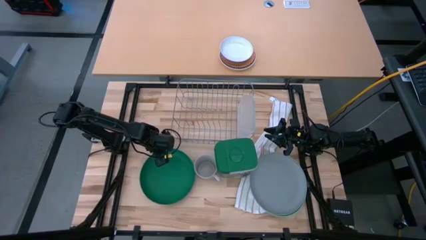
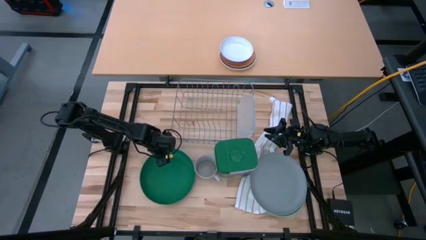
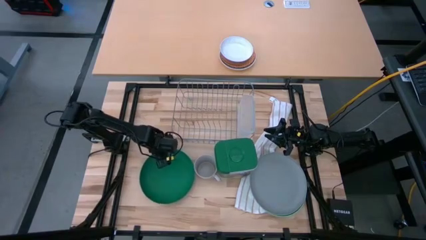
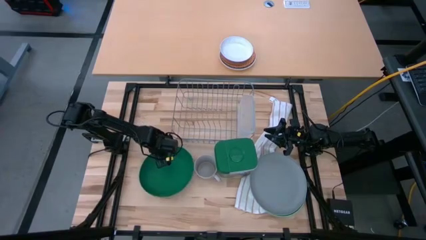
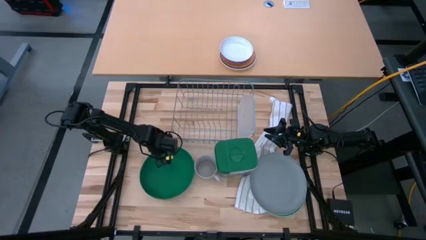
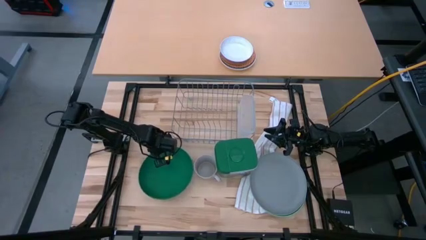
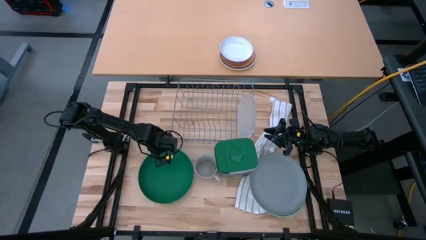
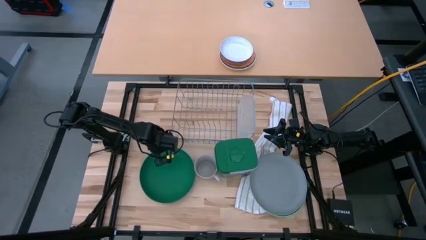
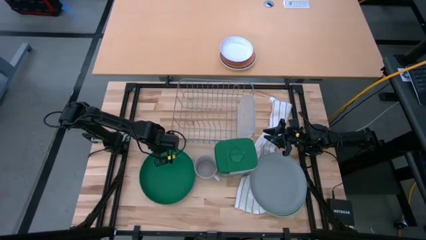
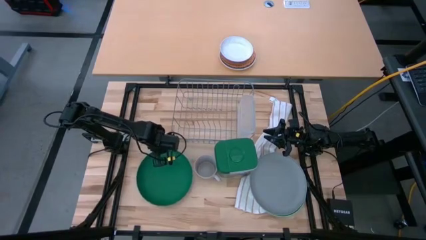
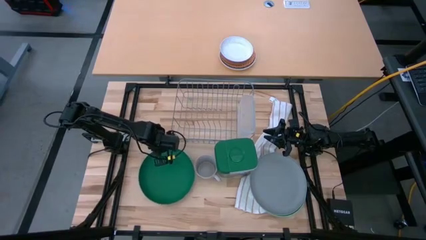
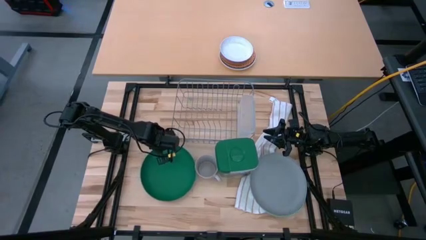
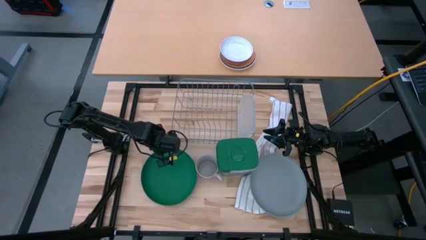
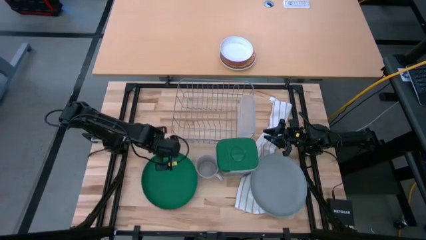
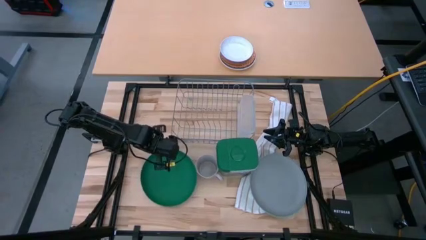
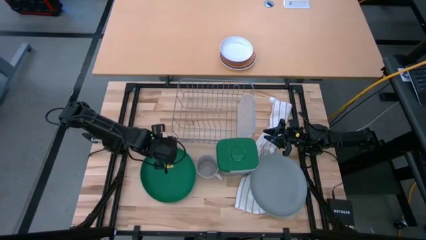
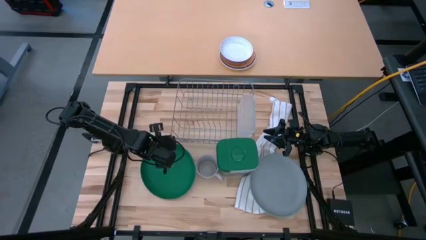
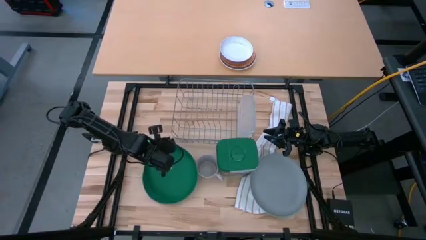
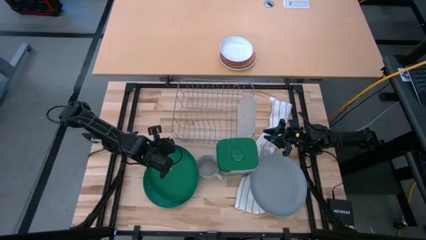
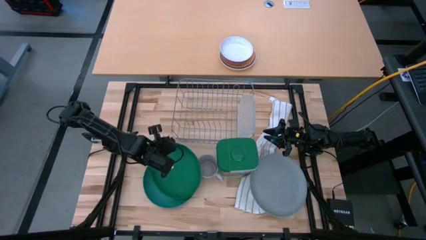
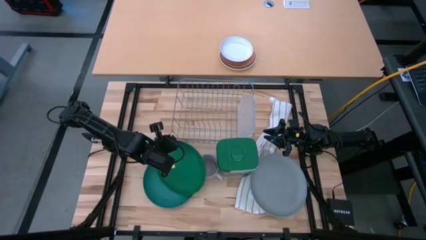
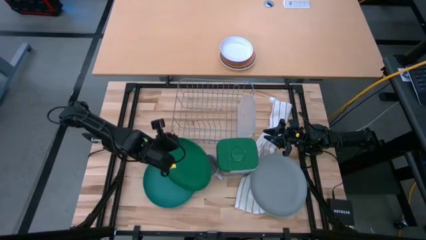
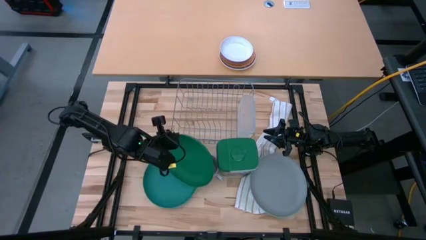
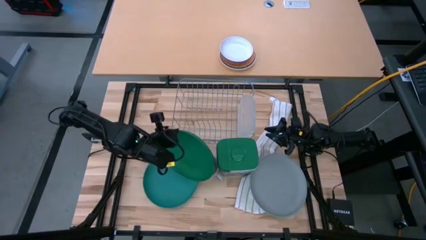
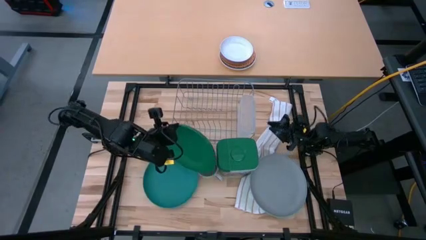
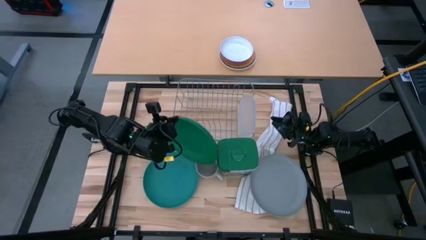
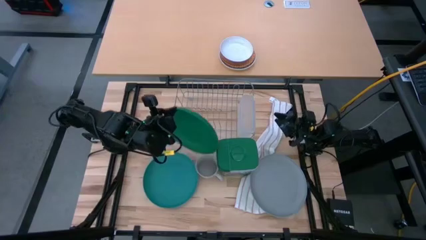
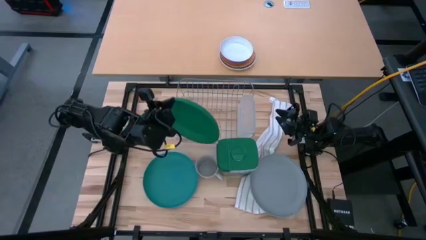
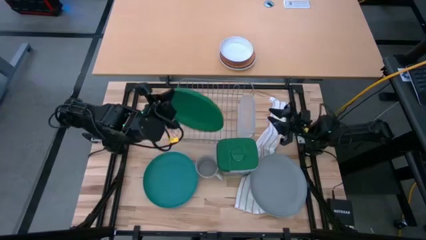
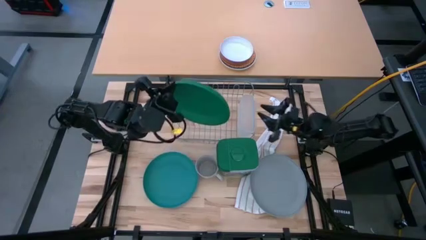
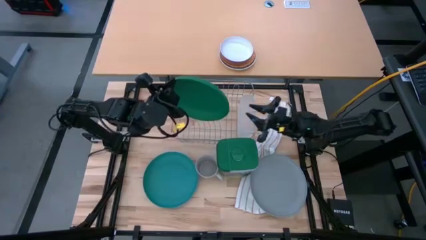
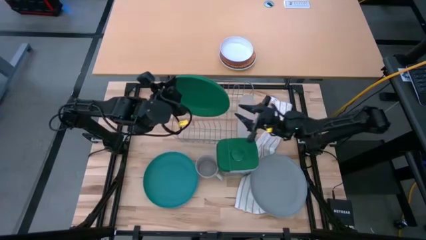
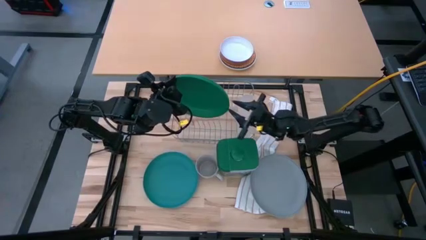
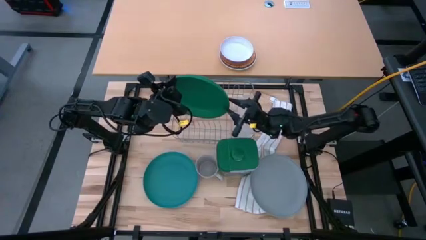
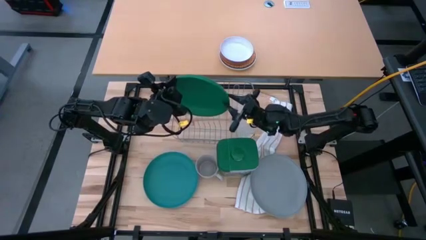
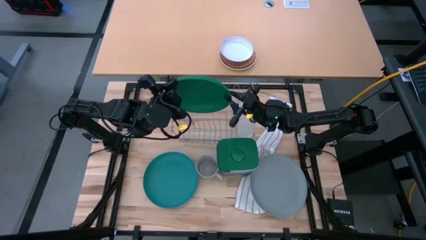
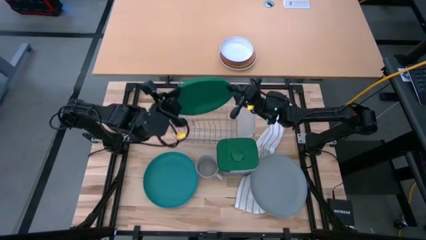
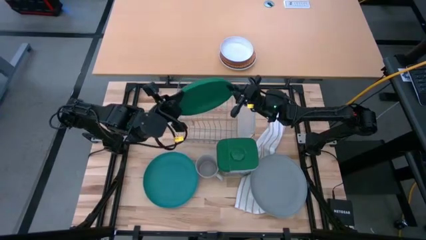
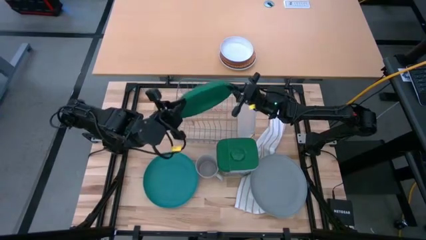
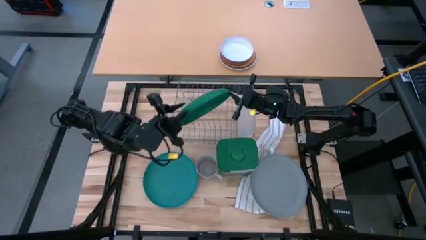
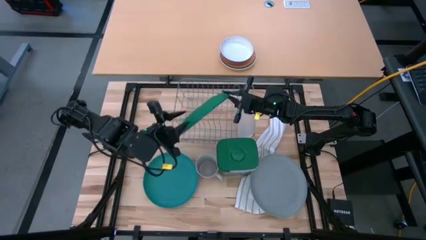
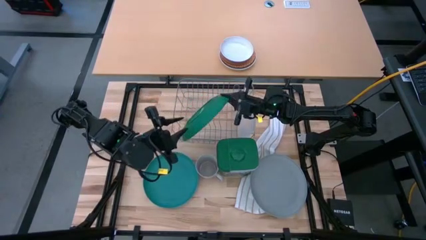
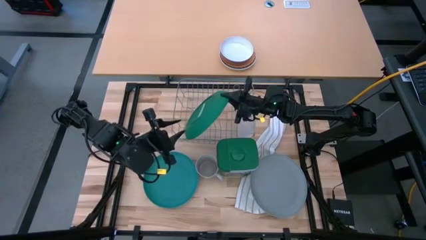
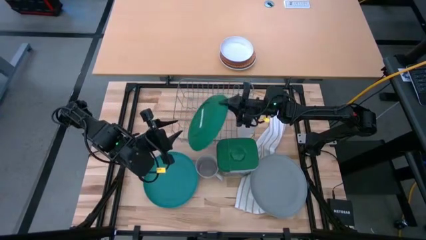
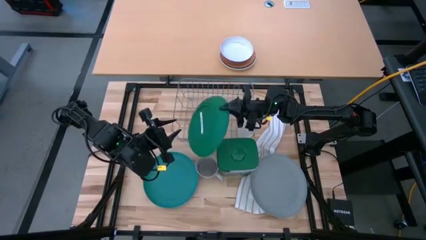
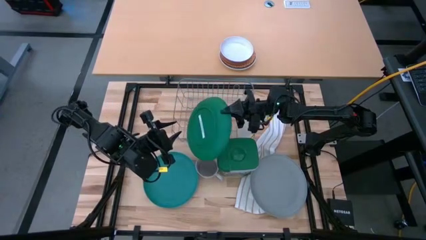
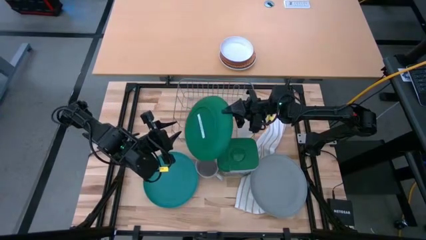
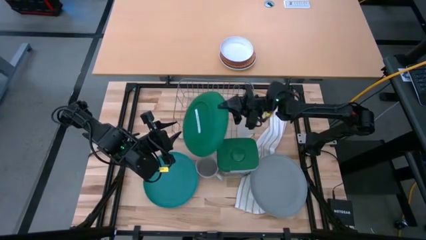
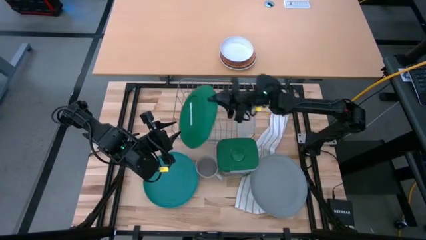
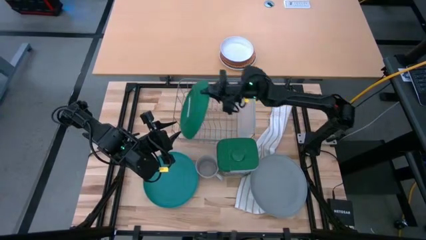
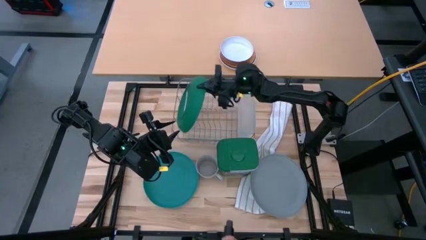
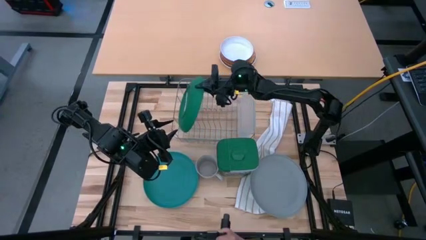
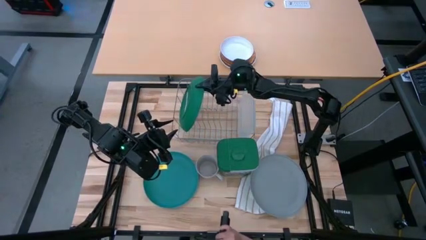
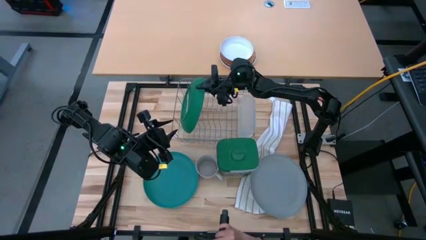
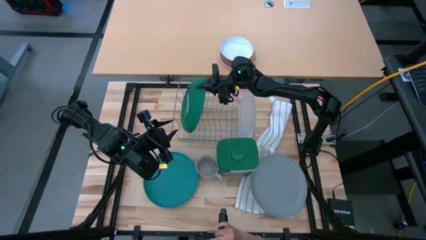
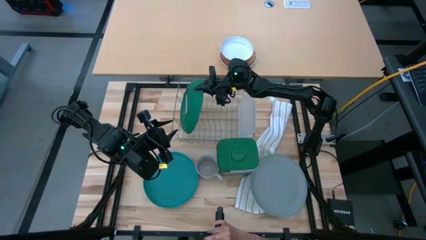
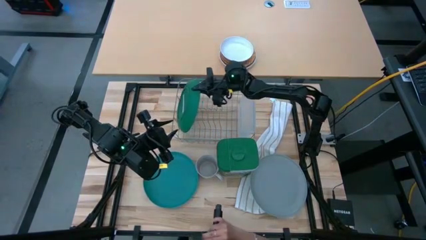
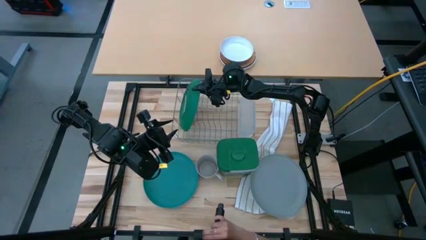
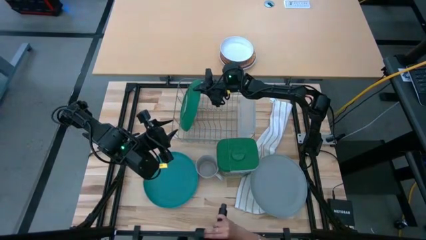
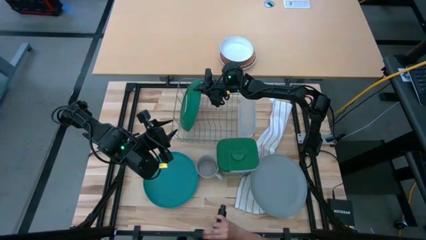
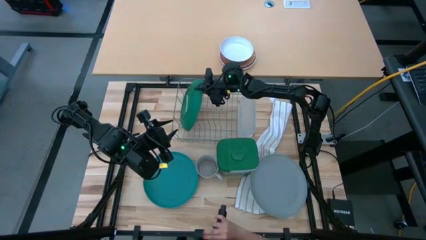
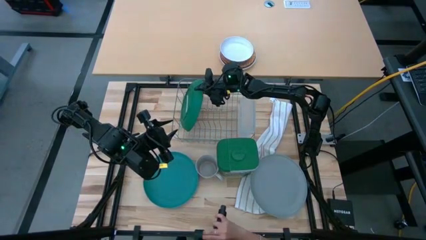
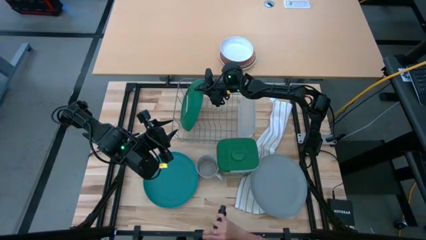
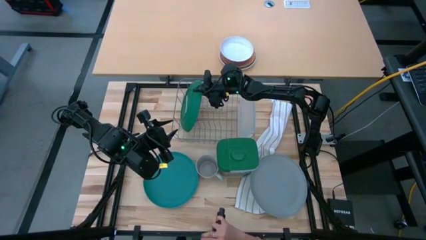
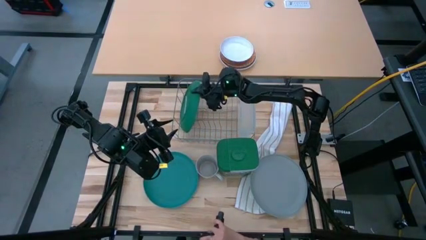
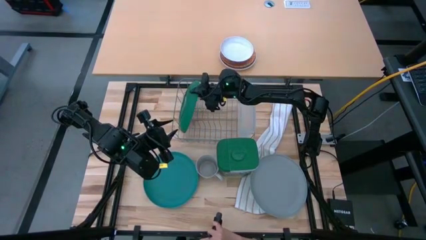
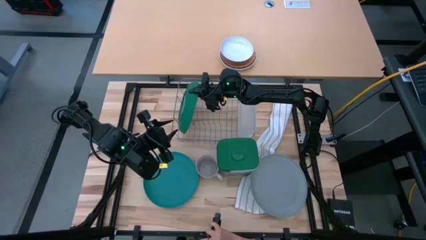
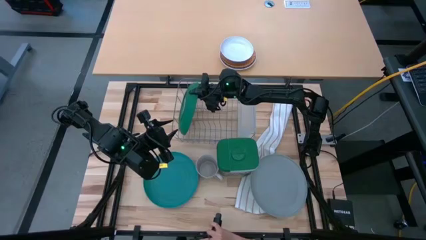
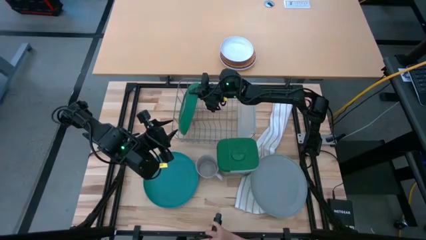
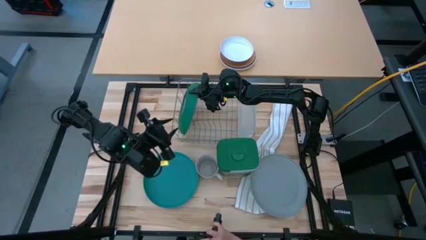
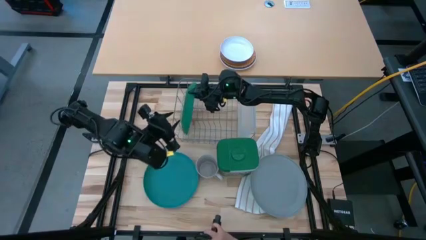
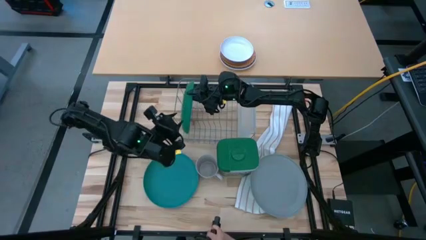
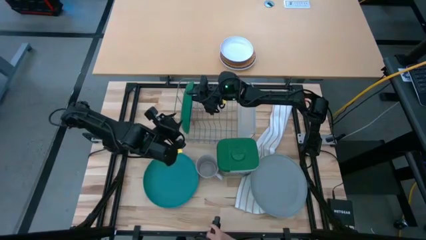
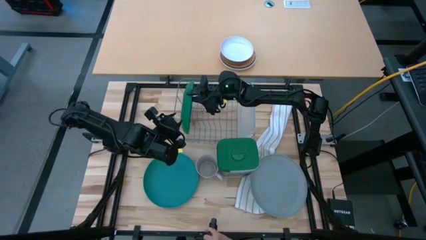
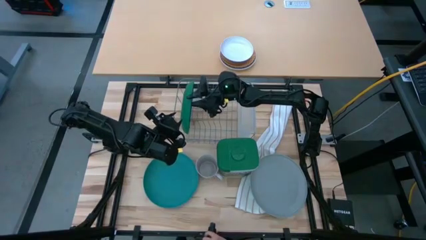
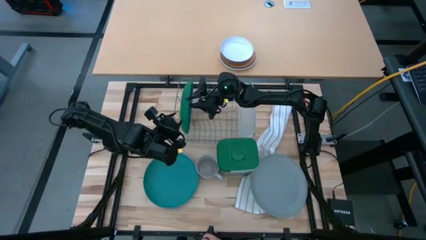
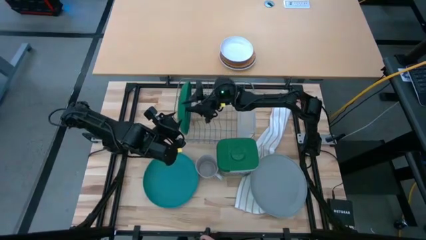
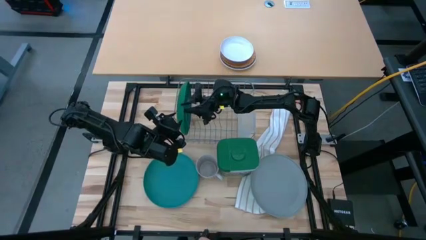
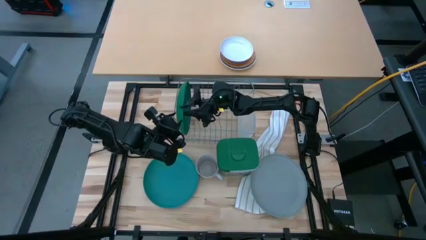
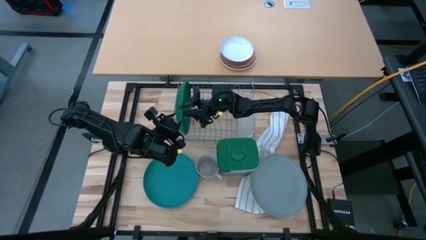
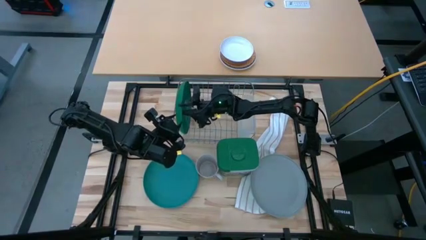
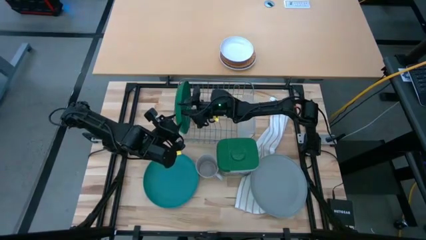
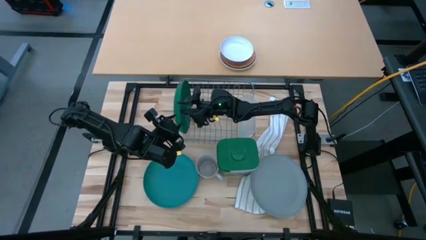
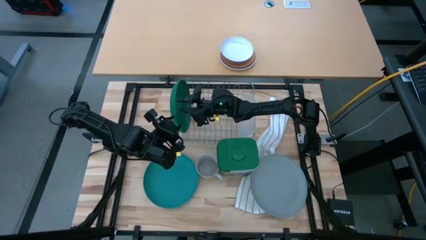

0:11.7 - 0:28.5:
Task: Sort dishes
Put the green plate in the dish rack
